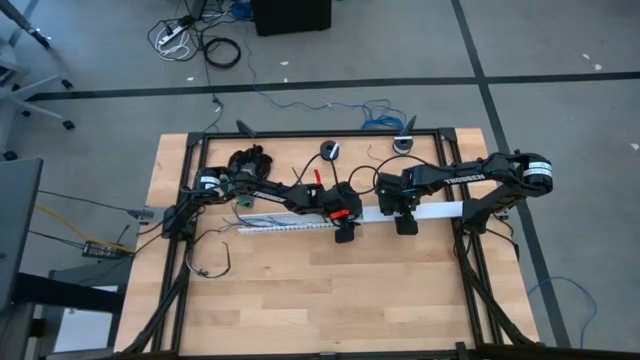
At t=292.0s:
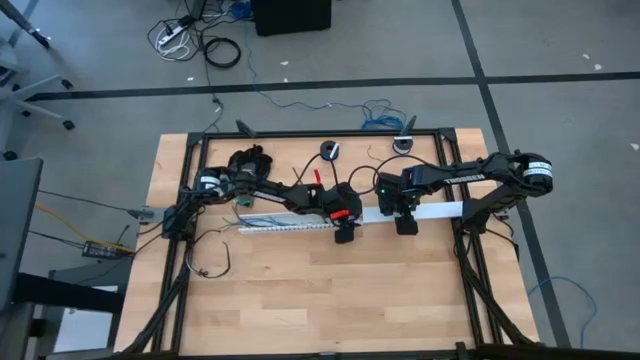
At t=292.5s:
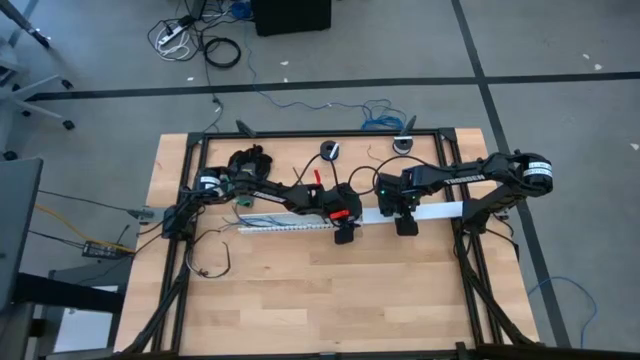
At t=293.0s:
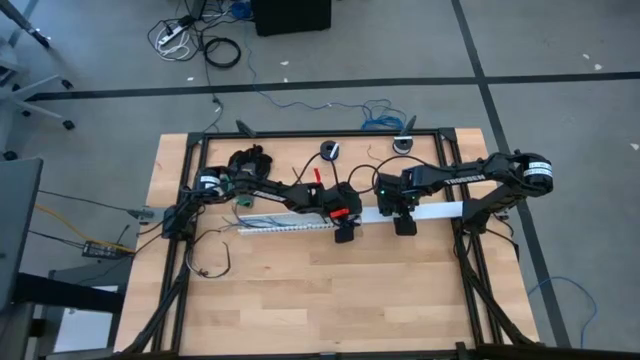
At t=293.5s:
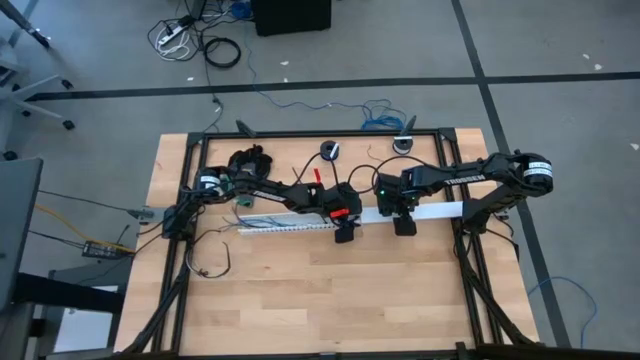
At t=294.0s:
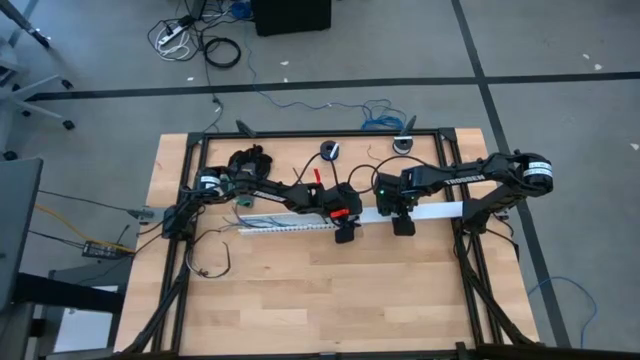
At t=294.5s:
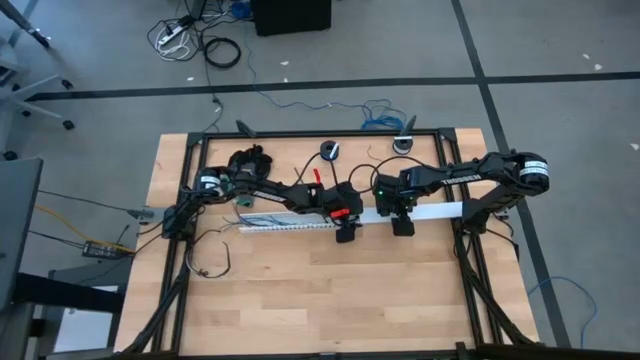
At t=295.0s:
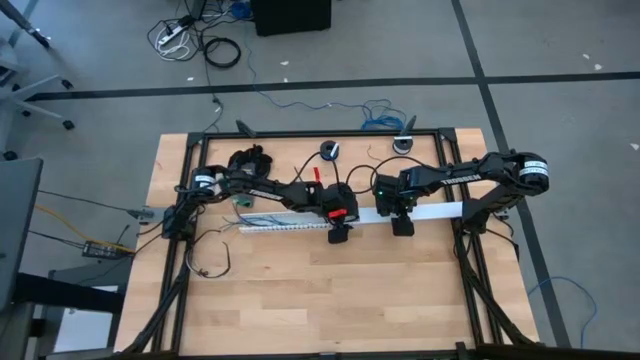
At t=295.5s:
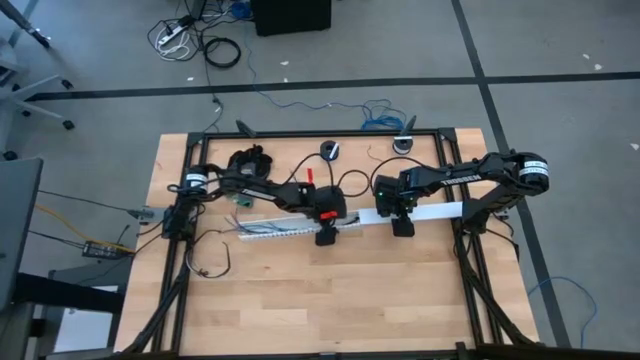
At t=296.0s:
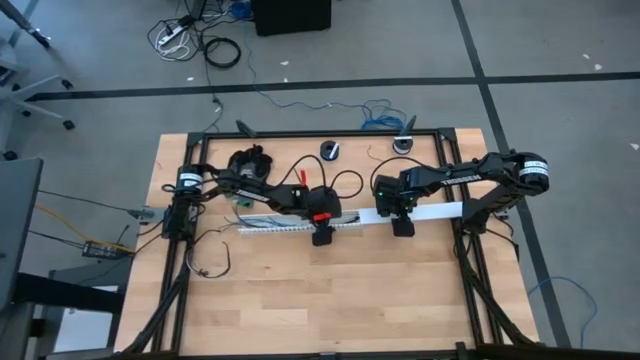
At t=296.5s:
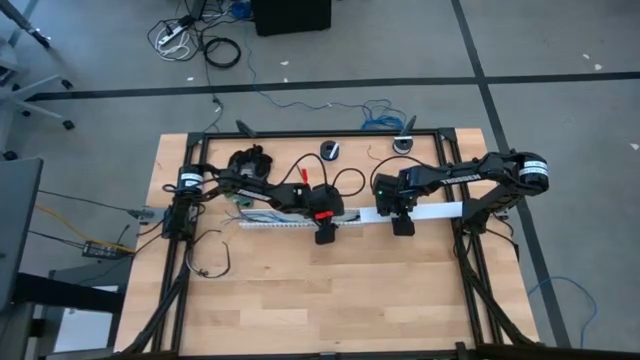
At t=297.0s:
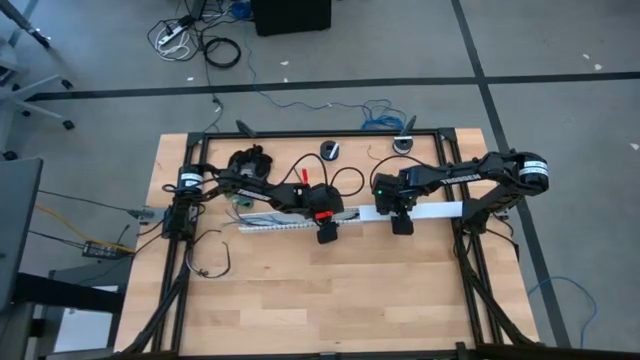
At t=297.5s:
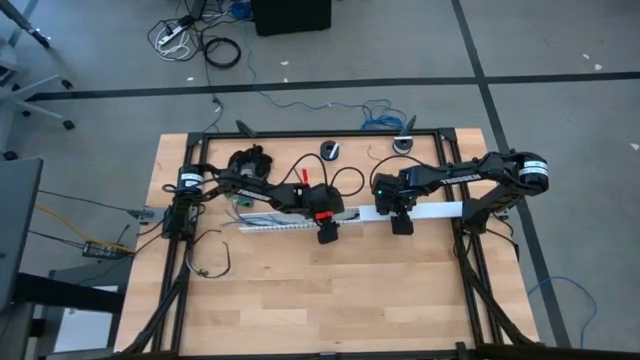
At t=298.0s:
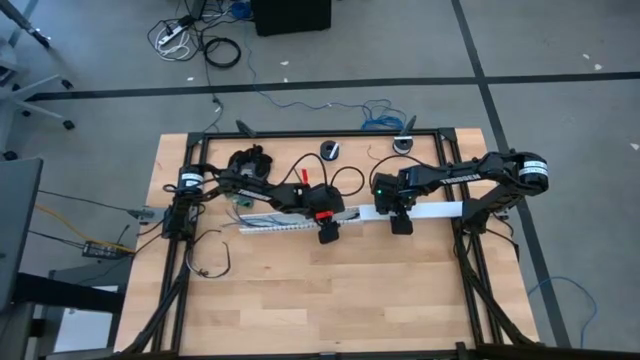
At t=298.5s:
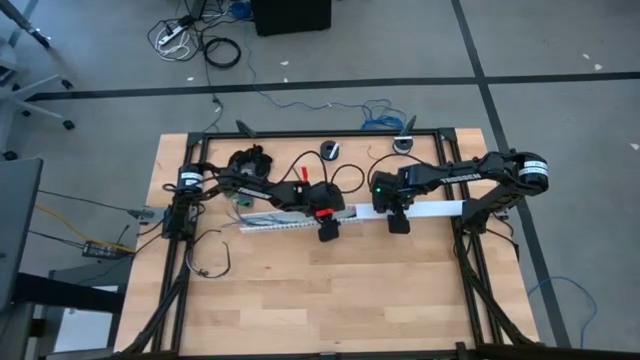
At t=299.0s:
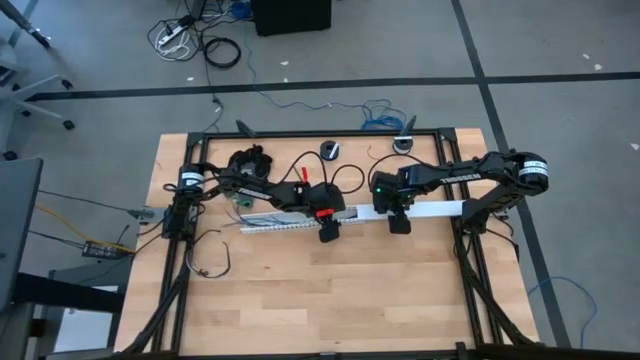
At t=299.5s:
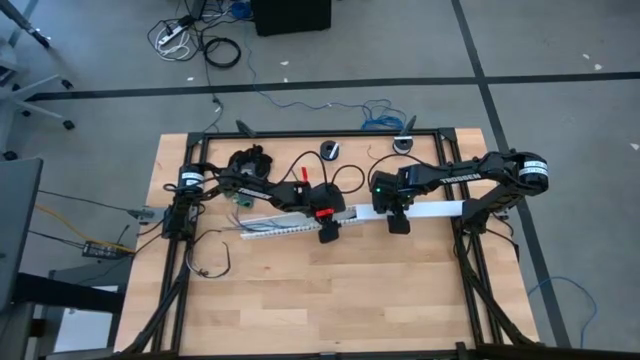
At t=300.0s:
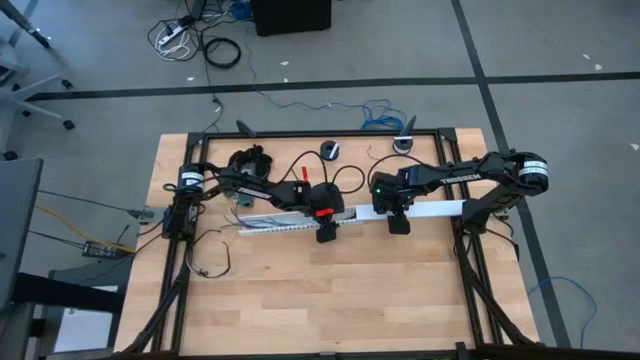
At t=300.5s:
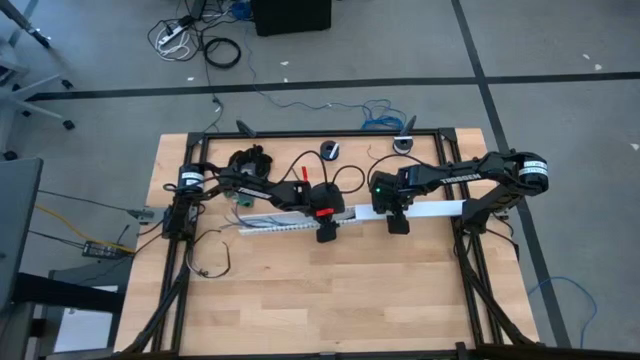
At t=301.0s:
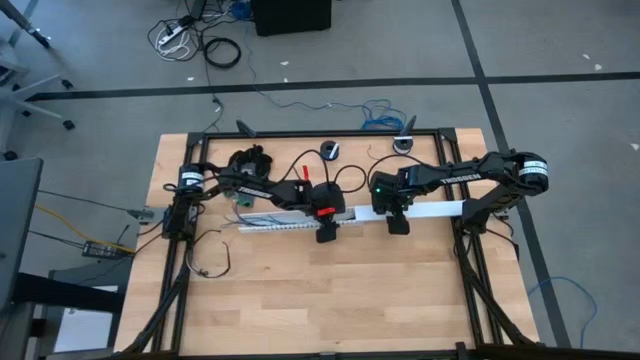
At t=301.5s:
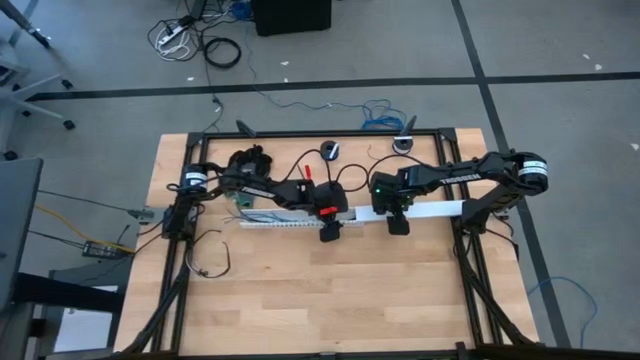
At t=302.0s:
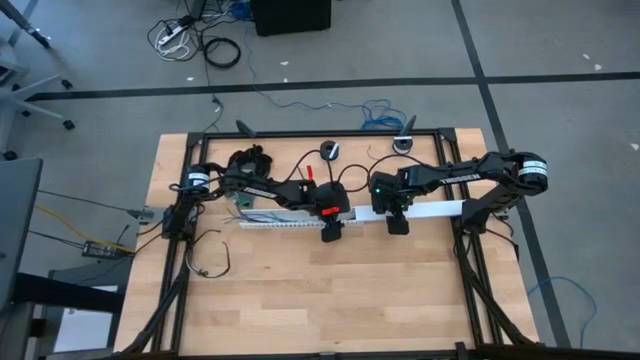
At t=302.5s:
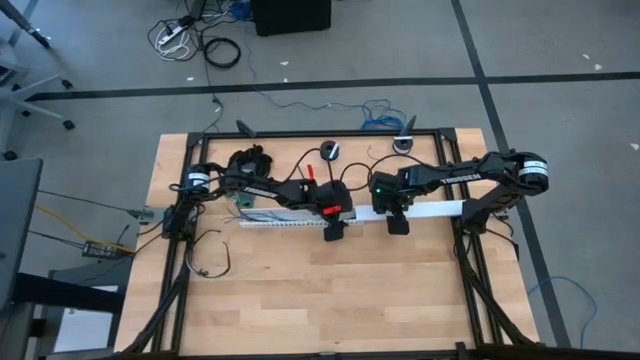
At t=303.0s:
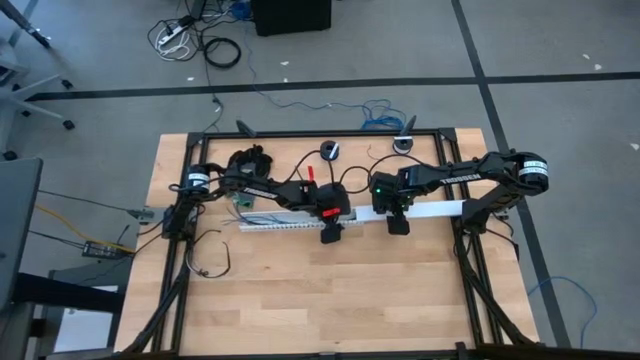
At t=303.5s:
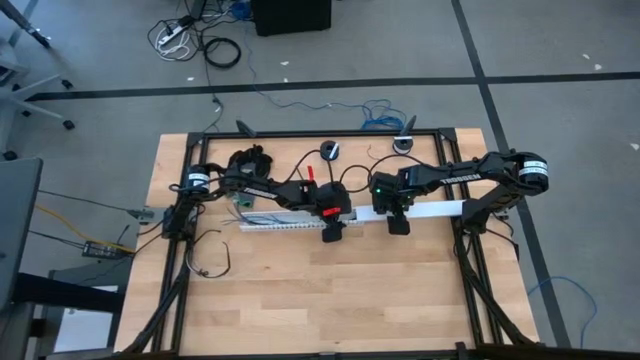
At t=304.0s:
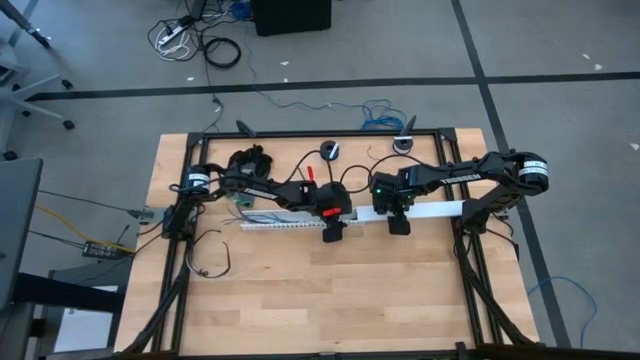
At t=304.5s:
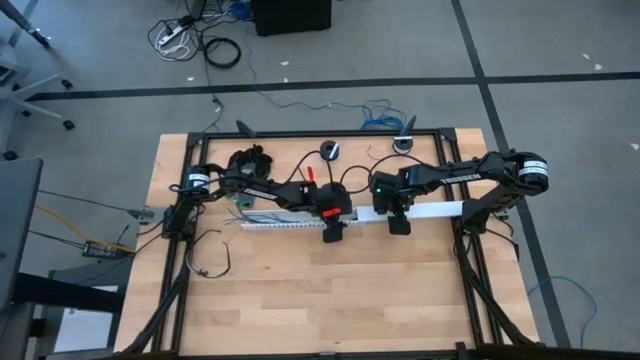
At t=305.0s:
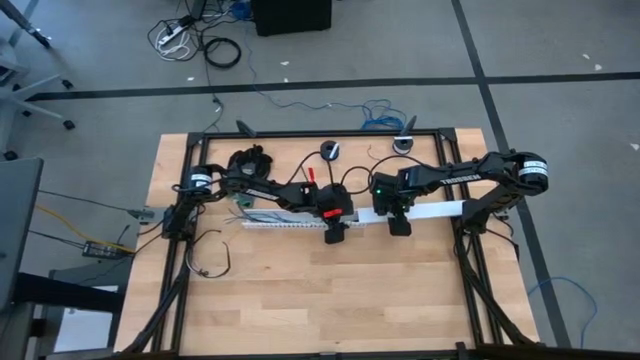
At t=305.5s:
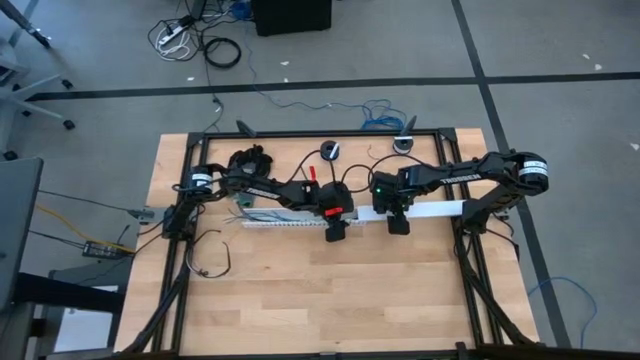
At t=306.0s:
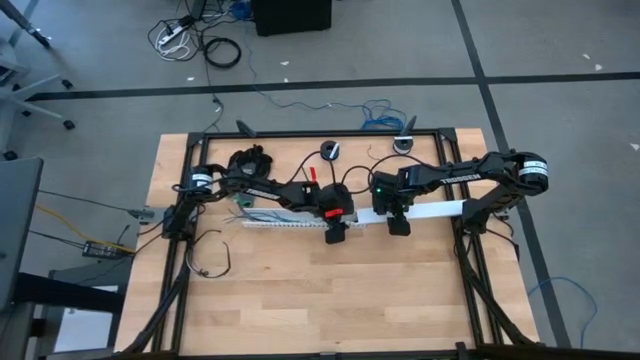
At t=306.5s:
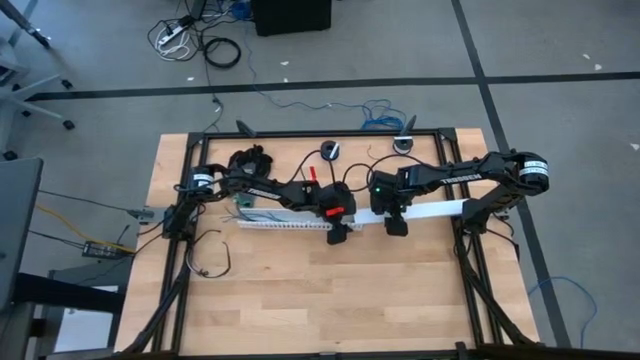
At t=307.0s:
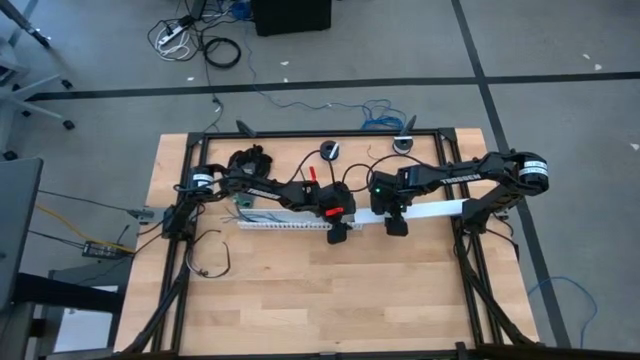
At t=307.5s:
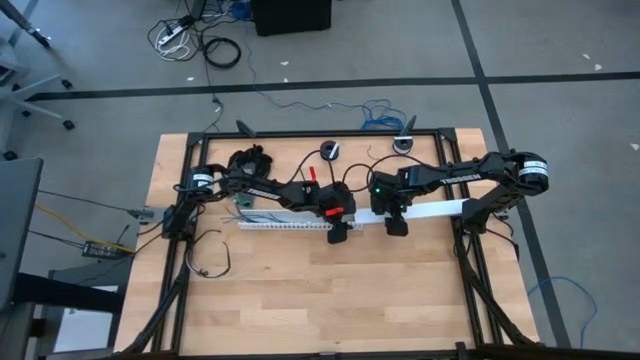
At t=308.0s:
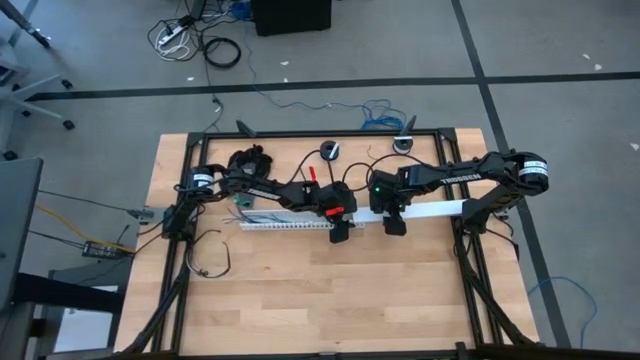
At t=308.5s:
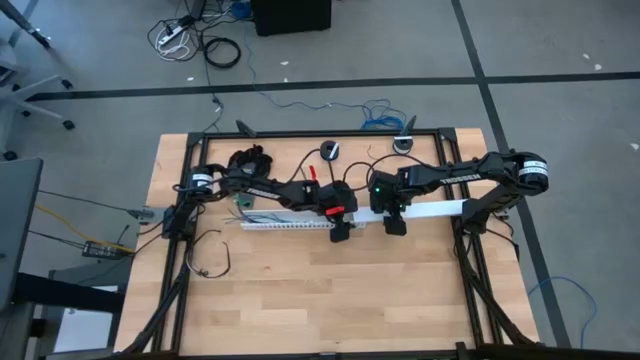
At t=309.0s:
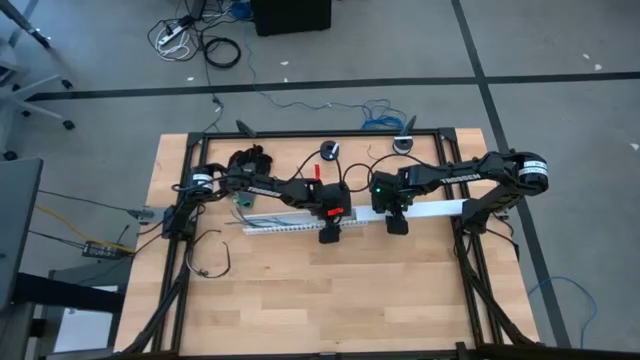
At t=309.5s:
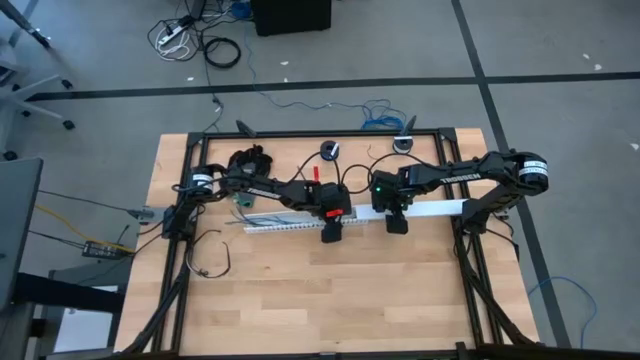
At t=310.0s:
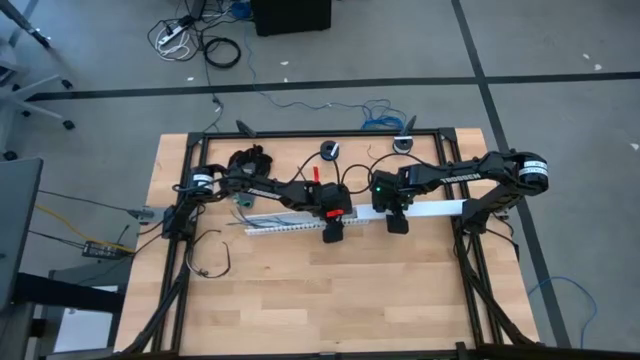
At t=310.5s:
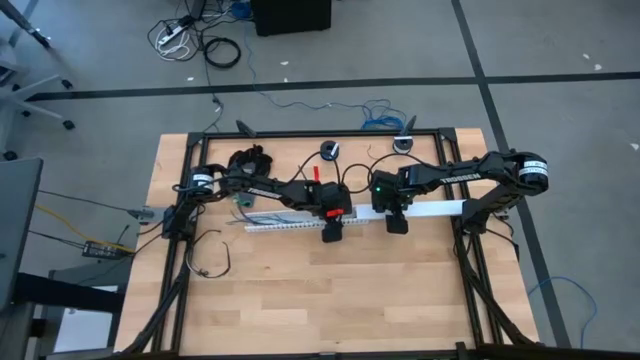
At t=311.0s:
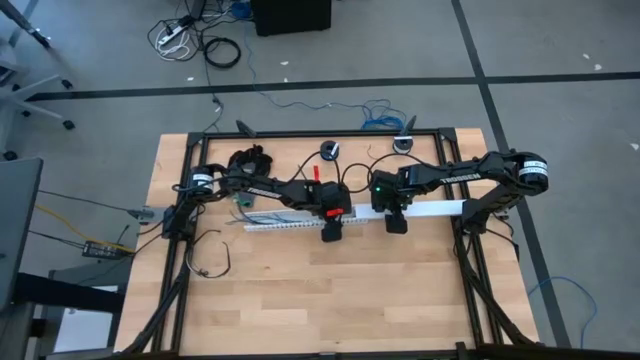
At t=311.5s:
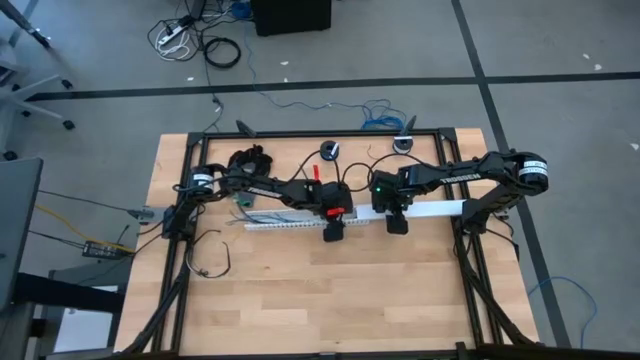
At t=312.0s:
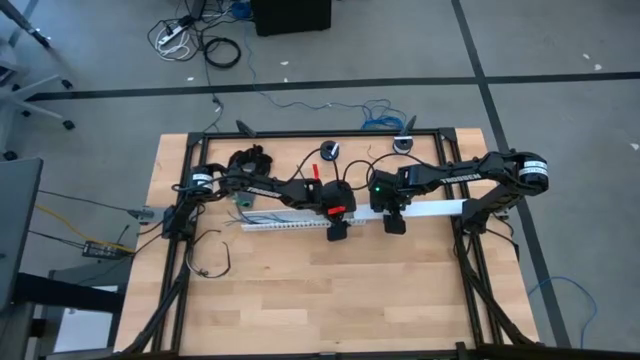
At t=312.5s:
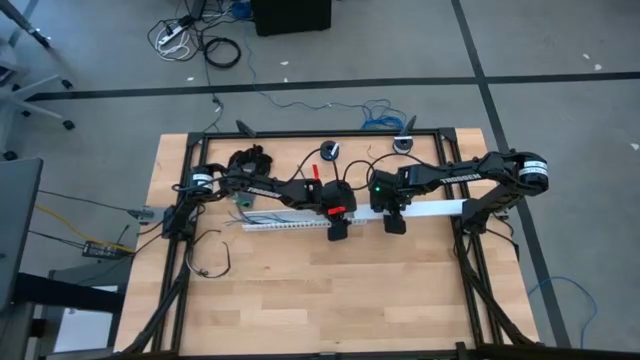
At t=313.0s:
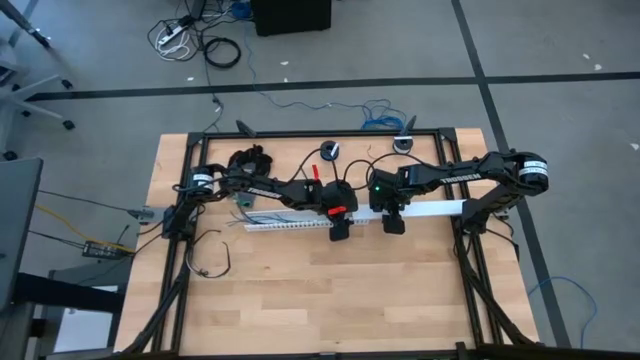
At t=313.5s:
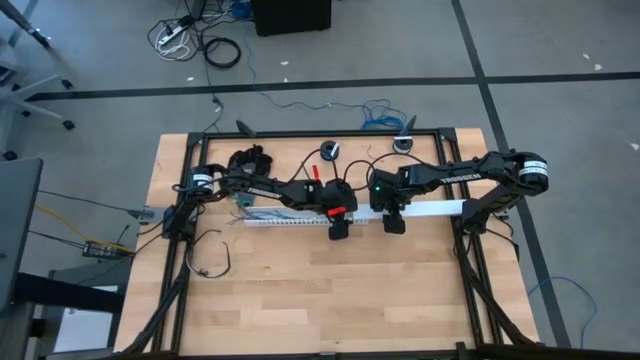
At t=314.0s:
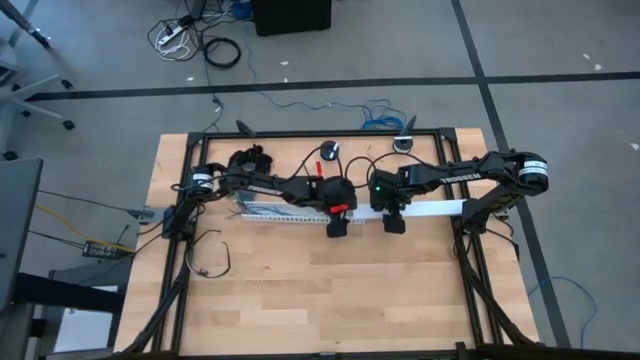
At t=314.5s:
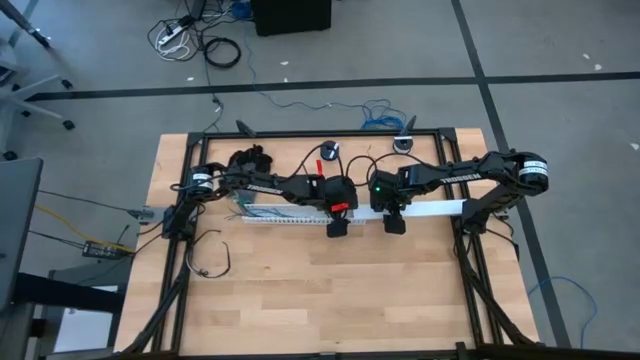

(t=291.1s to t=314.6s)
Task: Ziptie cables
Close the white cable duct
